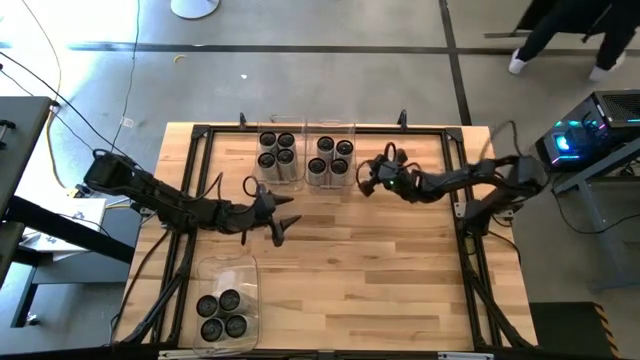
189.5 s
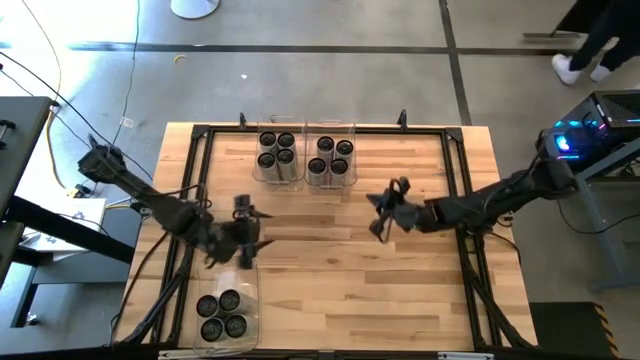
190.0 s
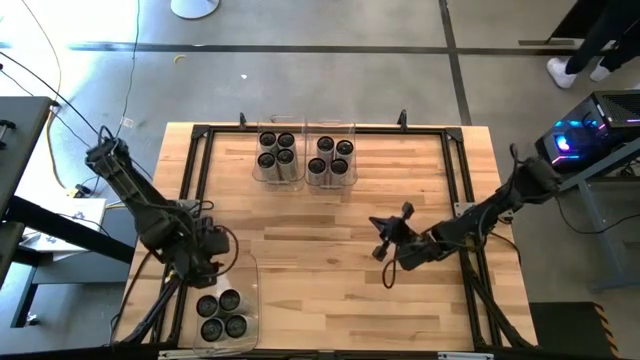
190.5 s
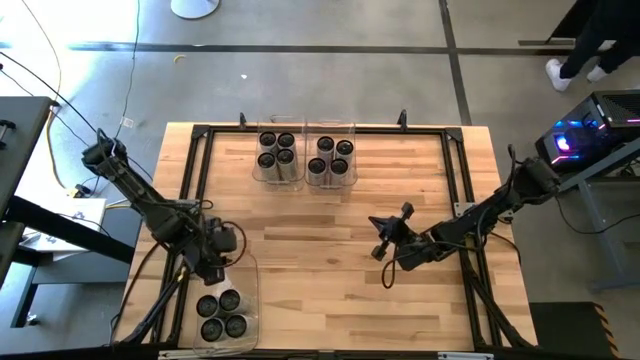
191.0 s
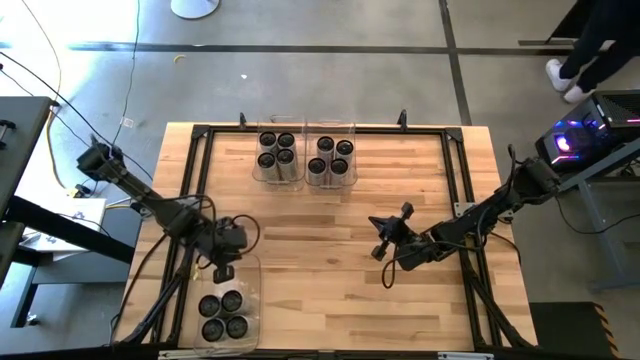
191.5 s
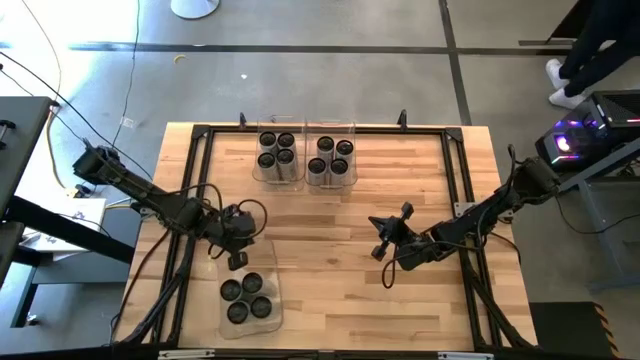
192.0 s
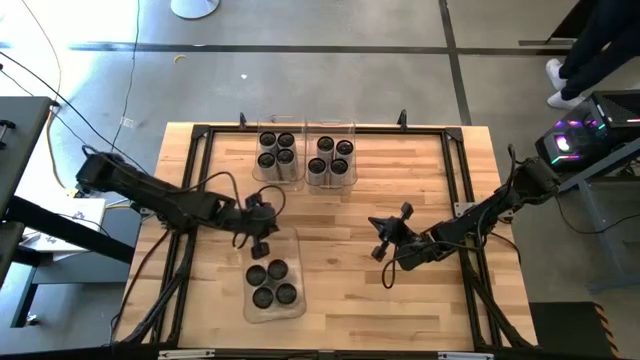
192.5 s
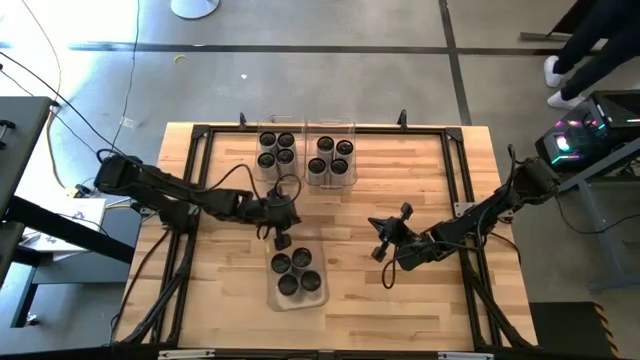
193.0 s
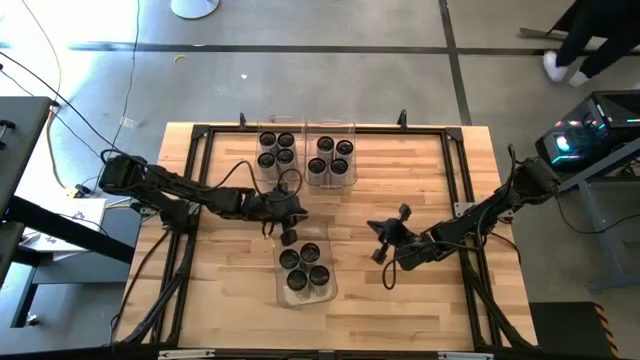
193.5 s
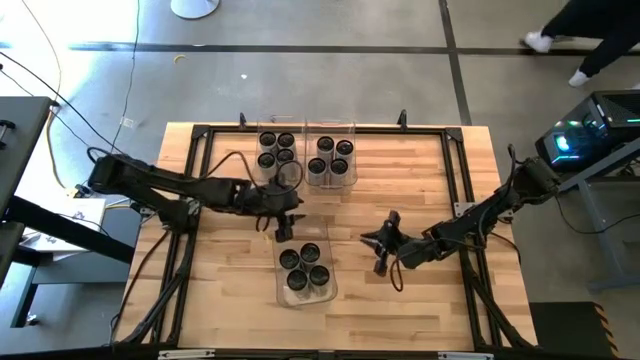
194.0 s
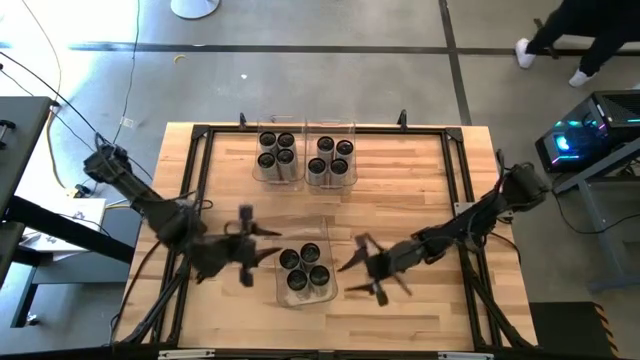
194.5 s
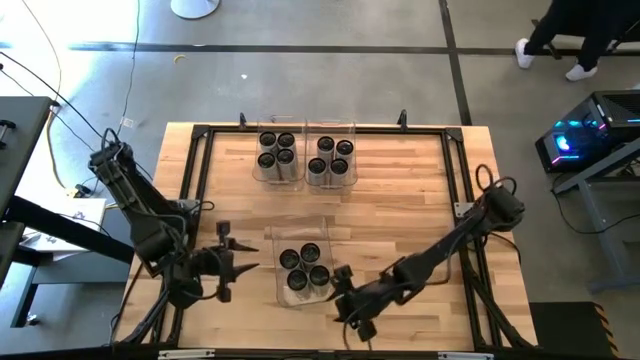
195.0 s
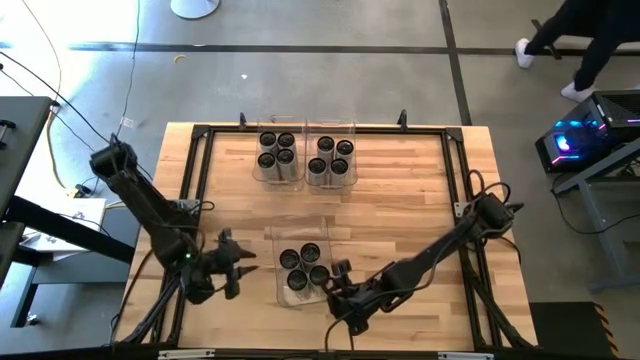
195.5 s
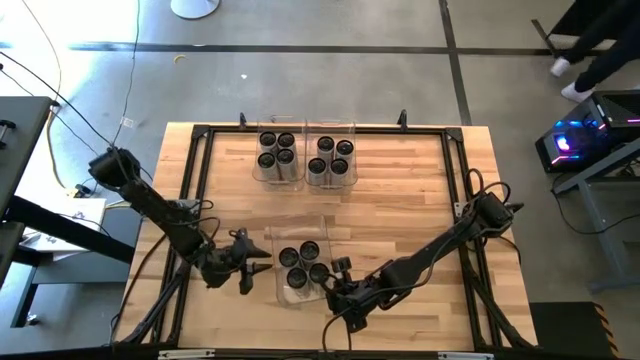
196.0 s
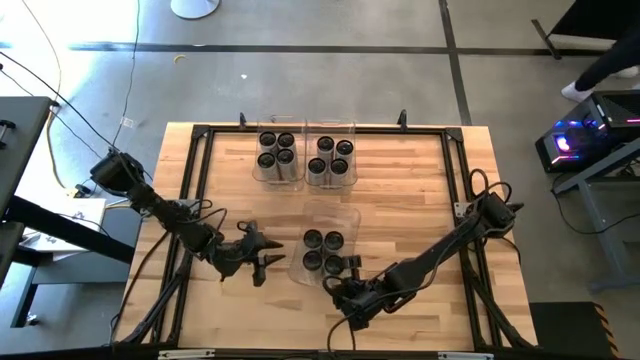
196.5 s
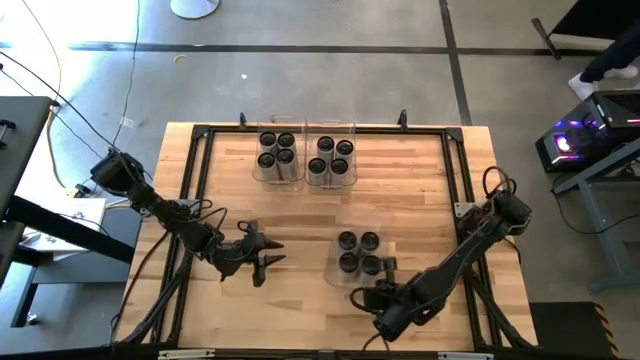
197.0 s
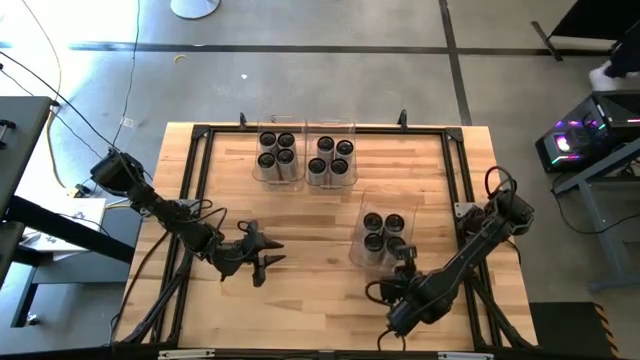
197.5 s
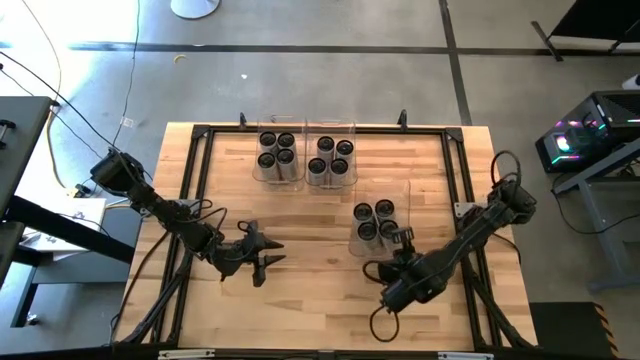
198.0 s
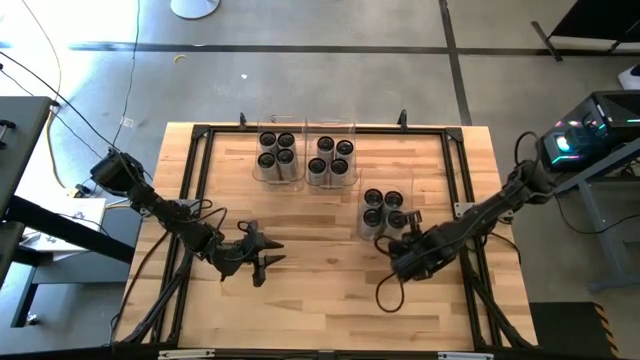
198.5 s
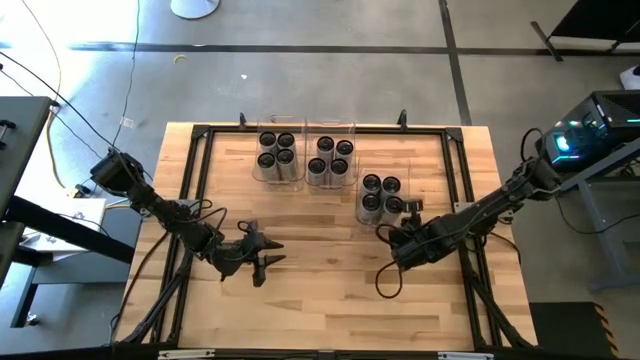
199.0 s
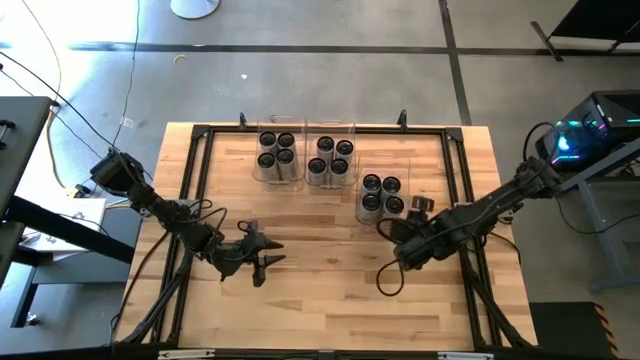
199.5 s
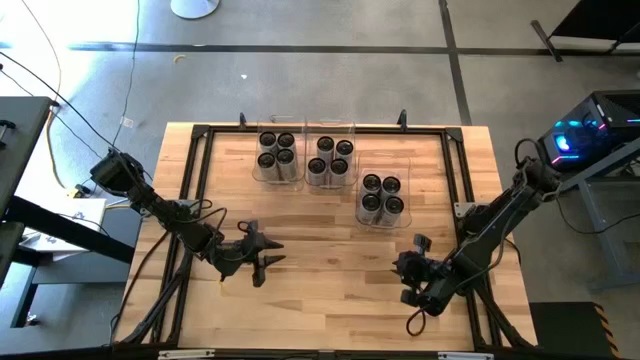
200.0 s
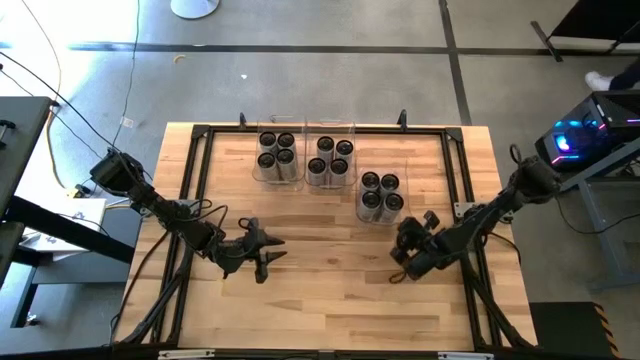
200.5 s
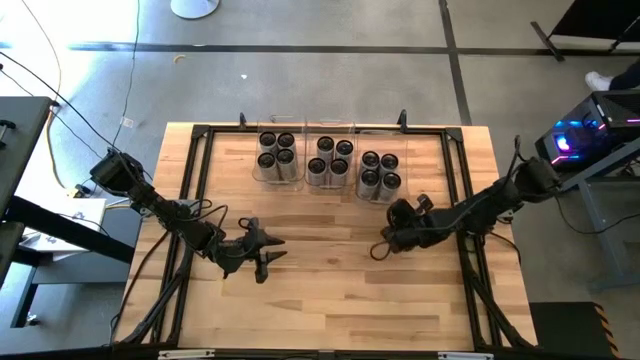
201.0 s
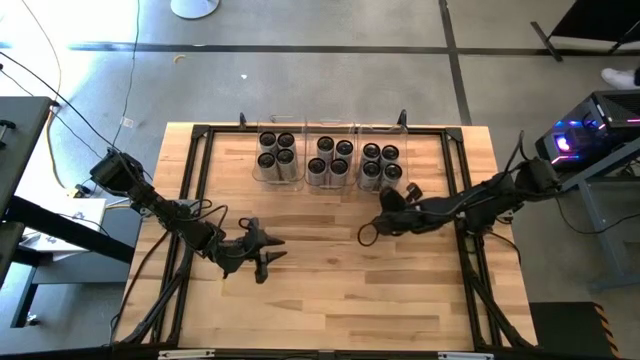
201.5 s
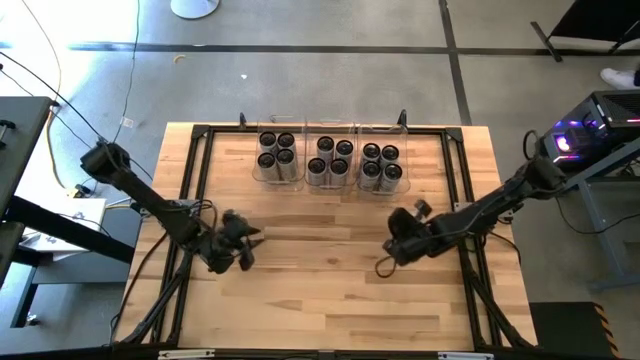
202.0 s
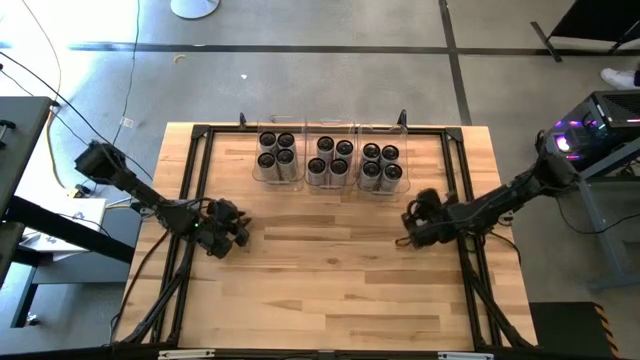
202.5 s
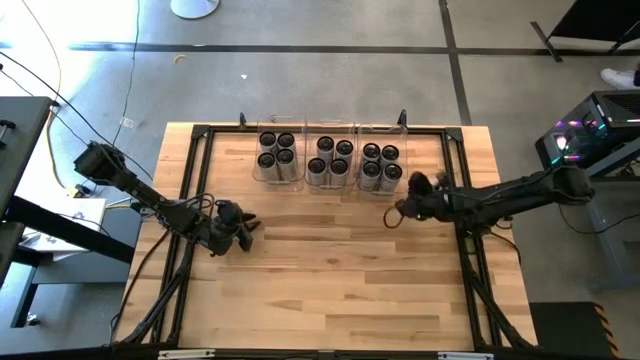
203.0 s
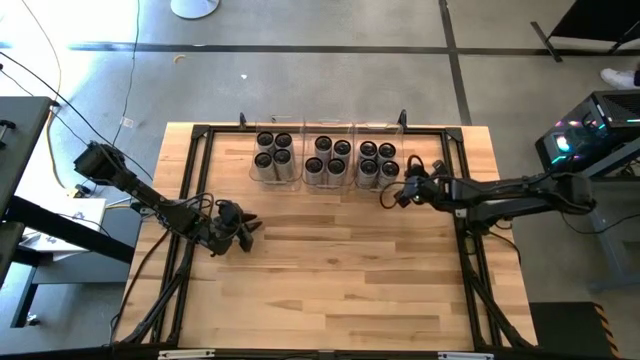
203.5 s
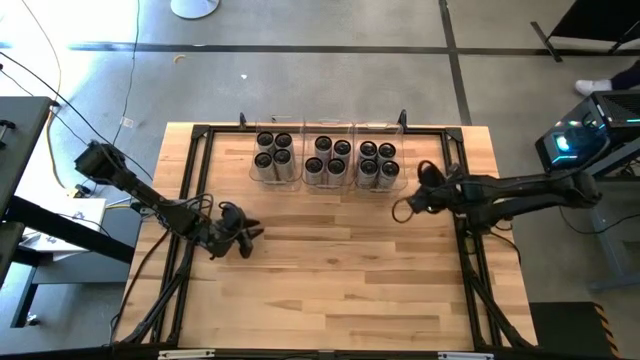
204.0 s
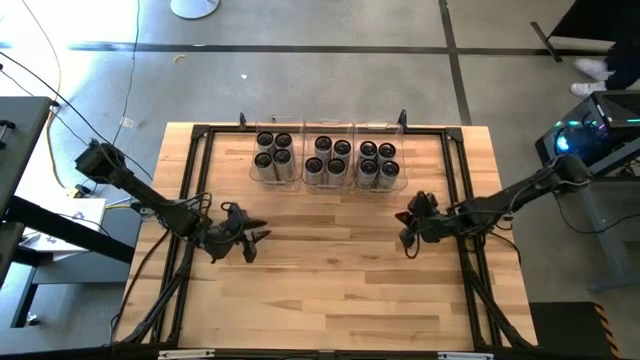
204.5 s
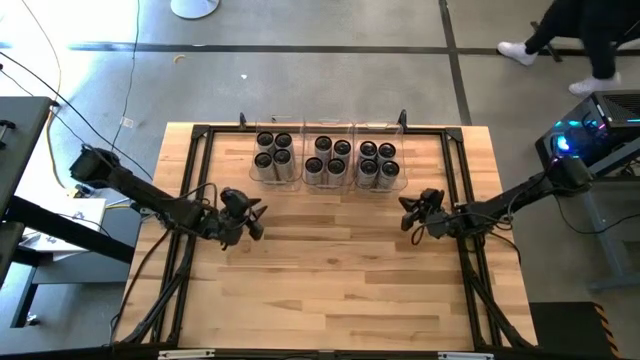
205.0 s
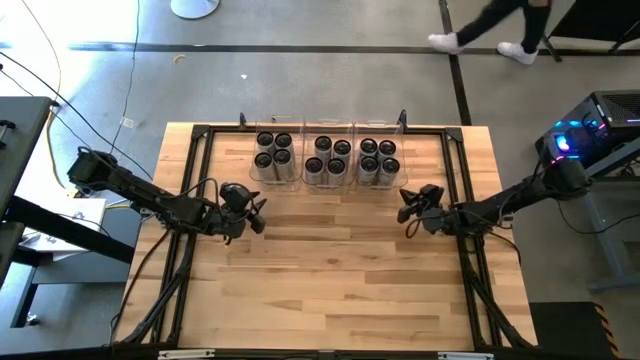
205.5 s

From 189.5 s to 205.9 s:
Task: Sort soda cans
Move the bottom transparent bin to the top right of the table

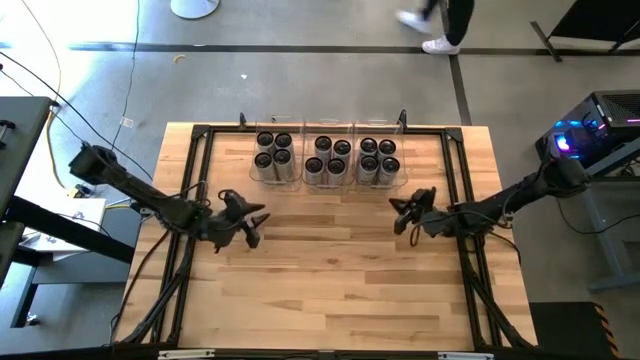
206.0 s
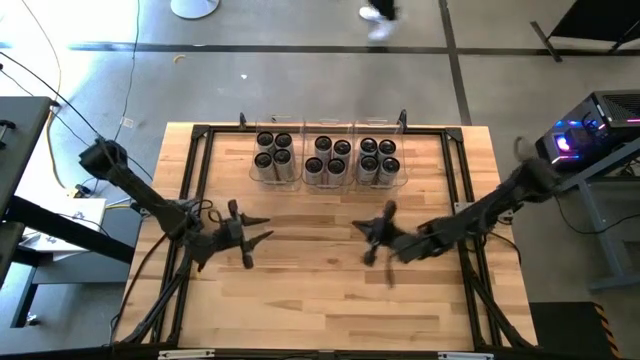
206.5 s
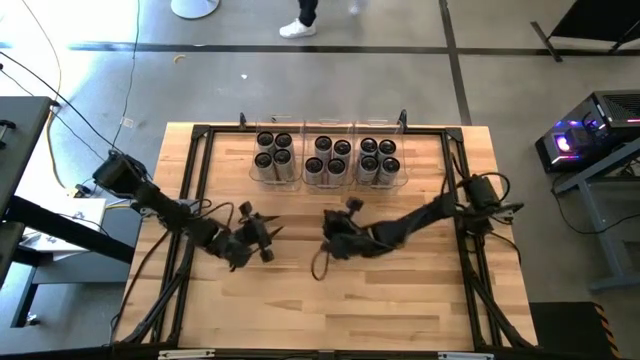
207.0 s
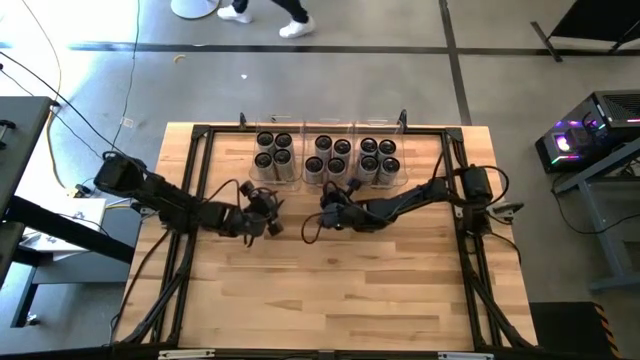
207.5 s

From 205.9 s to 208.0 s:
Adjust the middle transparent bin

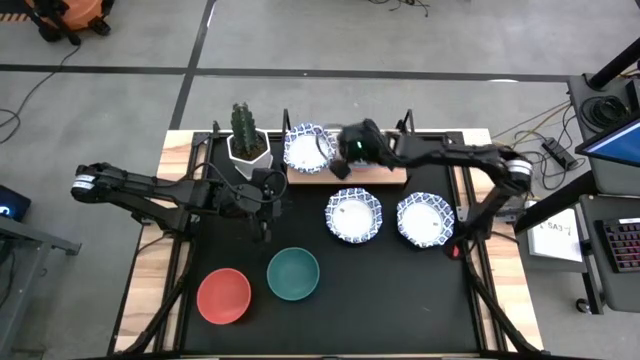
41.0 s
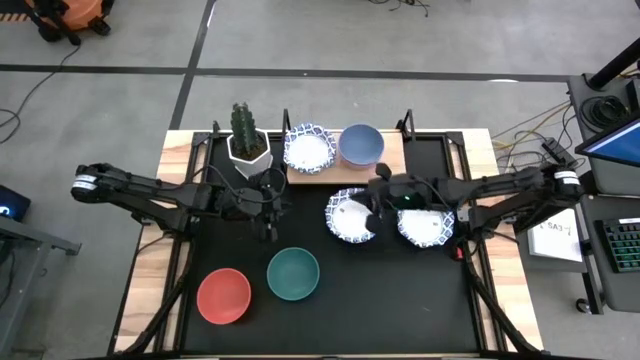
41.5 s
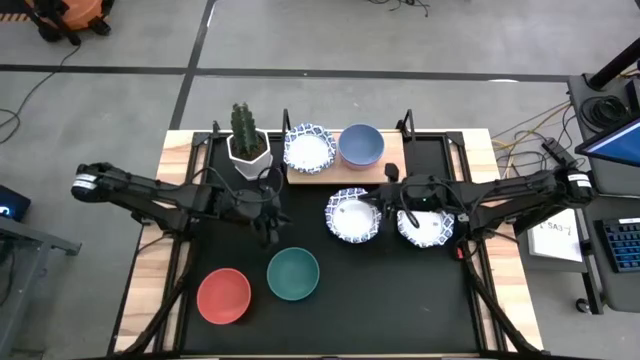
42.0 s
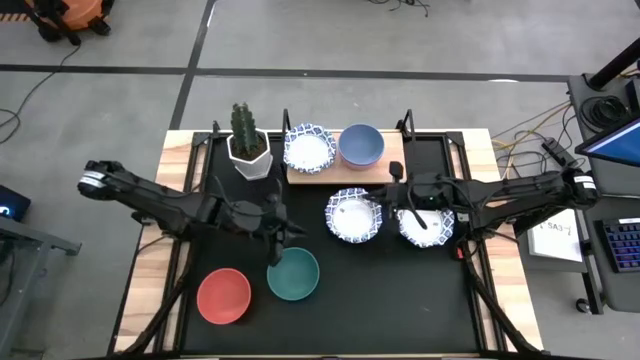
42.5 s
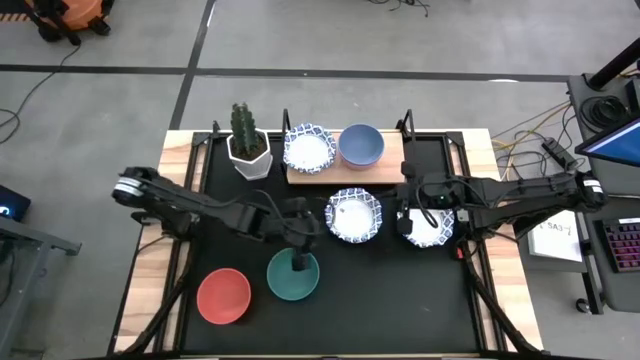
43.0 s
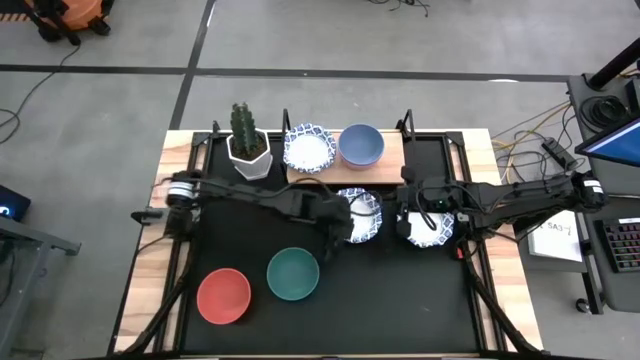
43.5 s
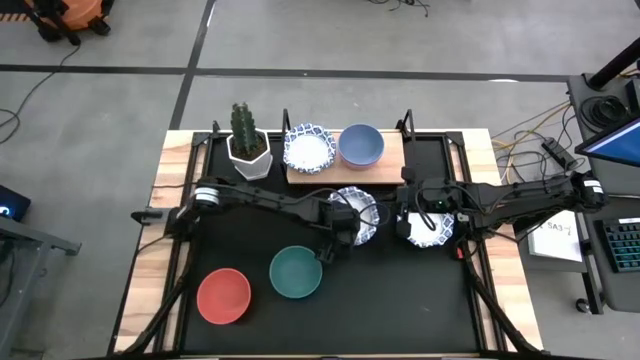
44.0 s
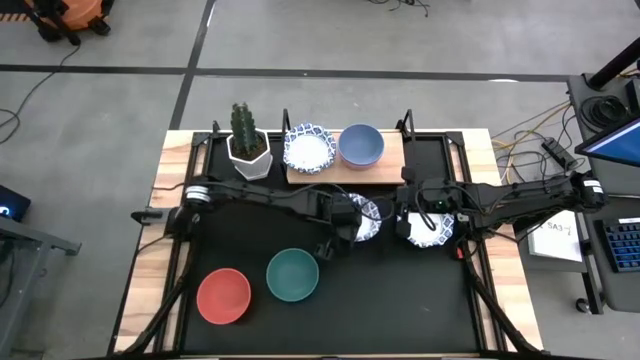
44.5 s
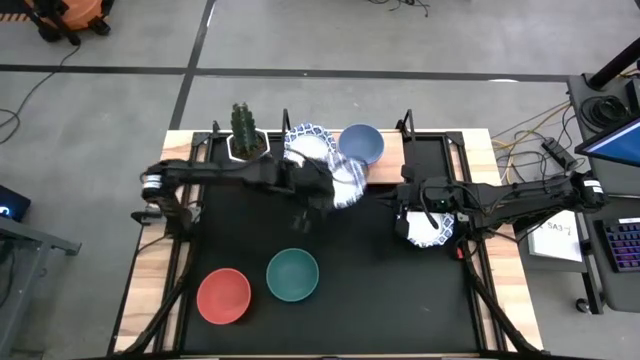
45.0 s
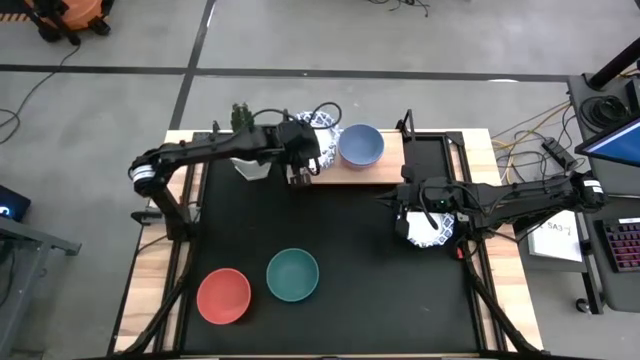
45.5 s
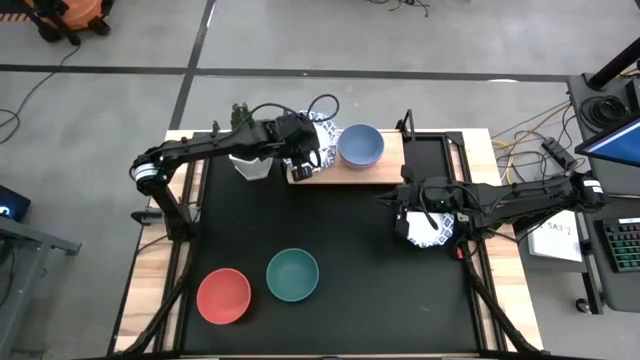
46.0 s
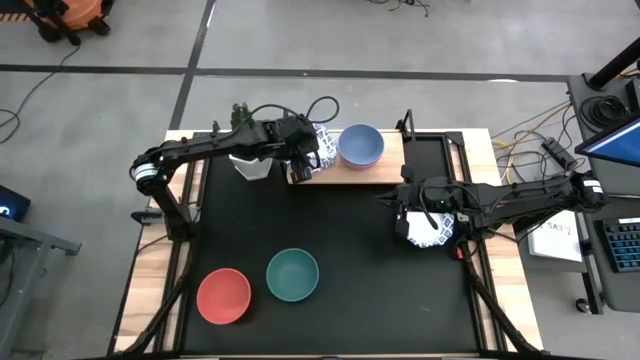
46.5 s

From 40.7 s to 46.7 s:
Task: Place and stack bowls onto a shelf
Stack the white patterned bowl on top of the white patterned bowls on the shelf
